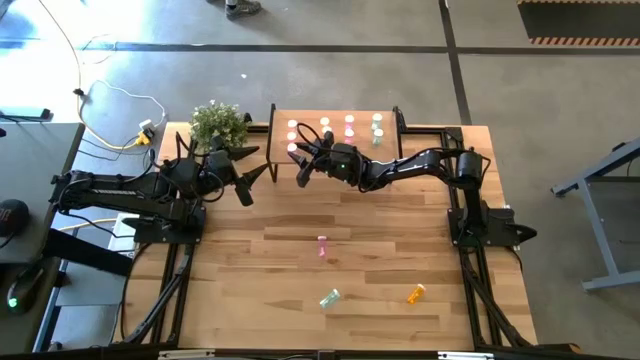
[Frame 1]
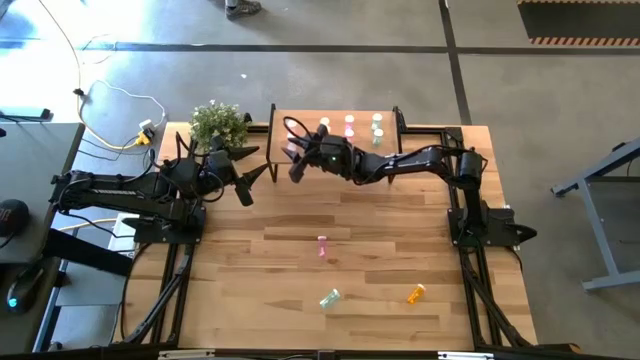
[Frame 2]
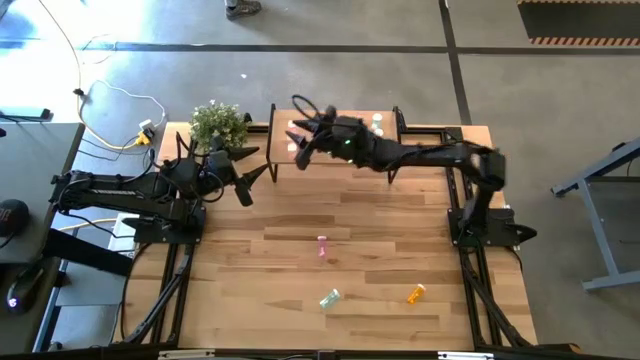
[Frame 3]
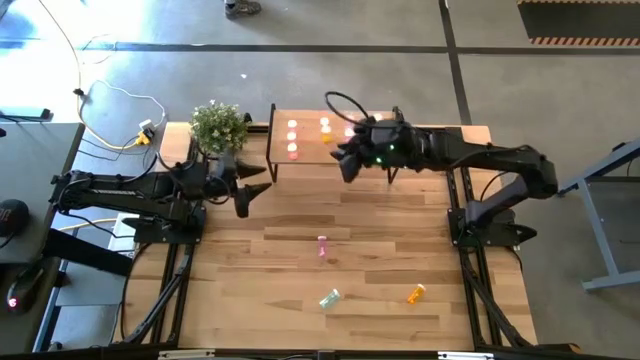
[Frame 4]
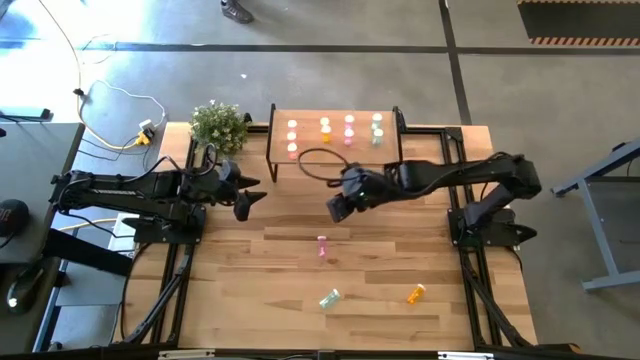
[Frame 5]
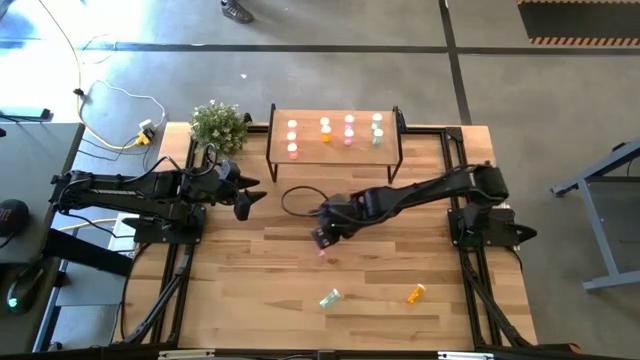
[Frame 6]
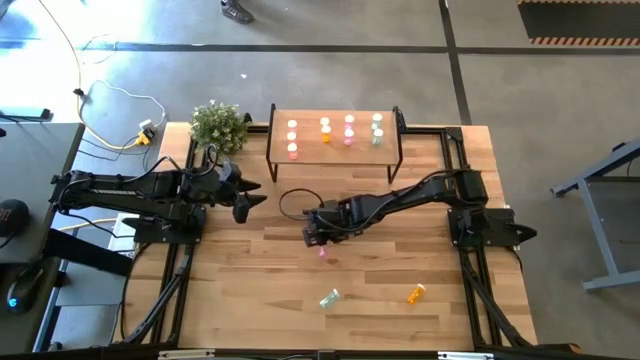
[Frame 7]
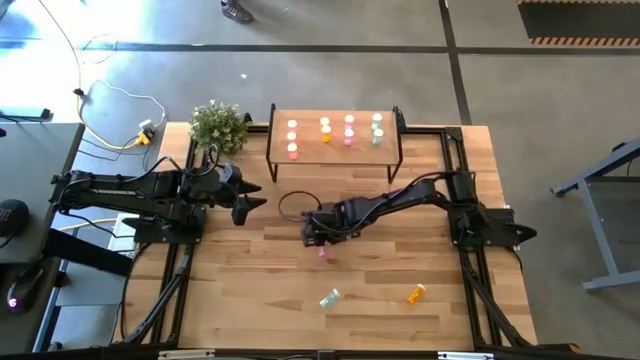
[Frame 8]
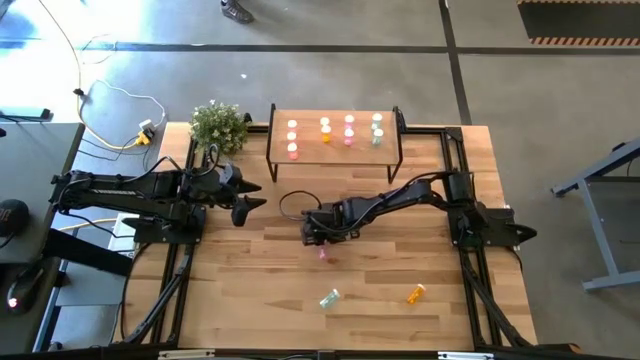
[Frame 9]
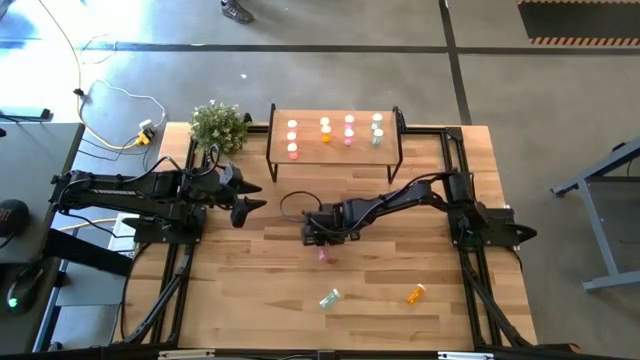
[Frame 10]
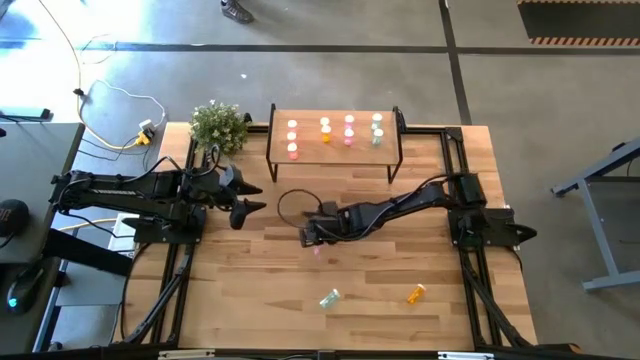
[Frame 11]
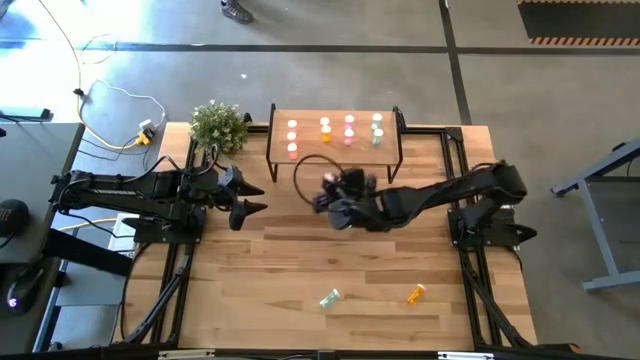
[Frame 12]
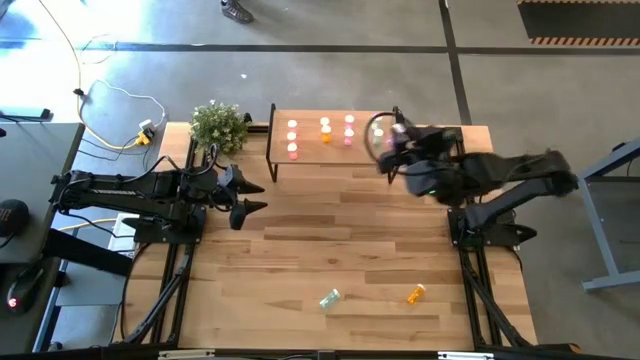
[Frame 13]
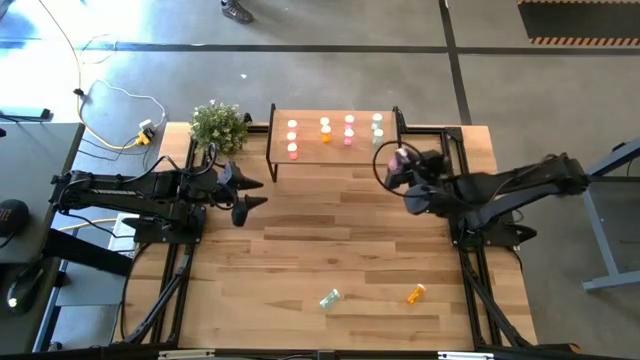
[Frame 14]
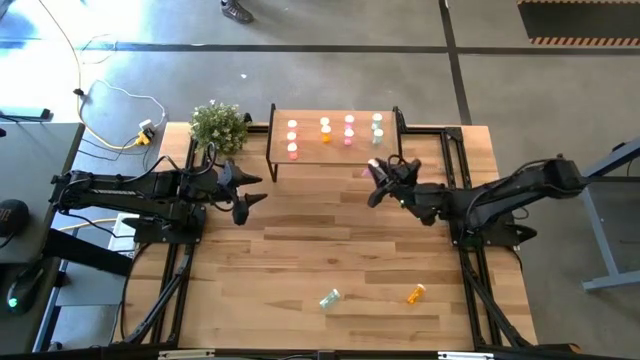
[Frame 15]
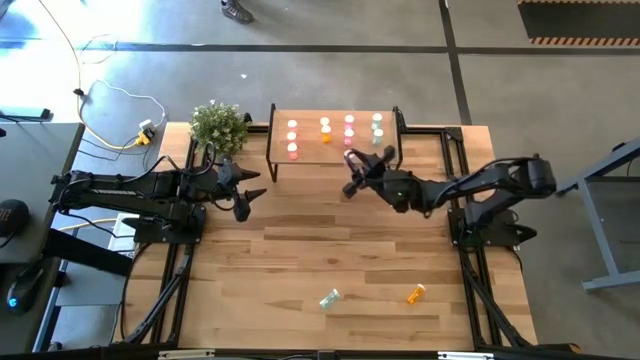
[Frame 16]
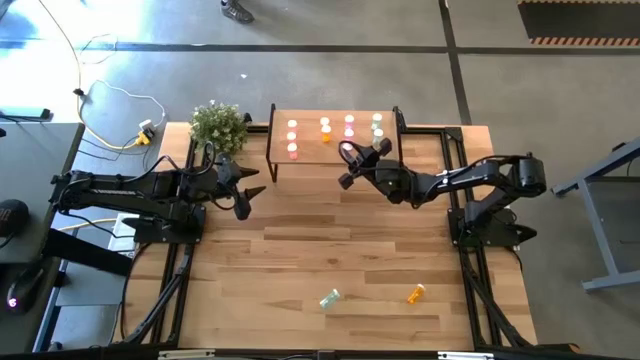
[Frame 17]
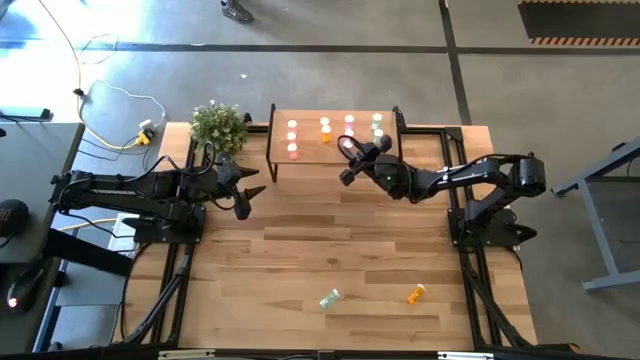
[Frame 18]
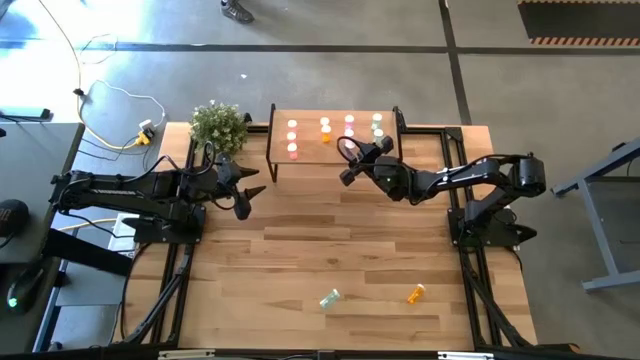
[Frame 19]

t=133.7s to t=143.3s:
Task: Pick and place medicine bottles onto shelf by color
Put the purple pill bottle on the shelf aligned with the other purple pill bottles

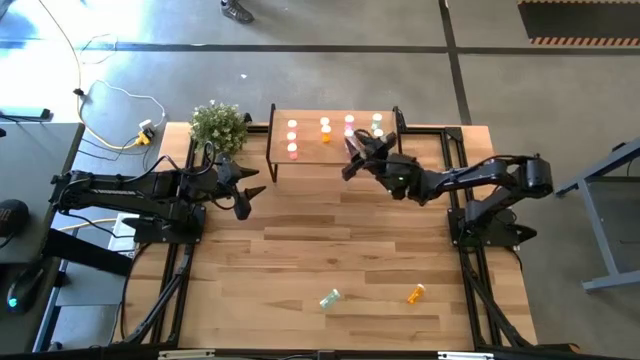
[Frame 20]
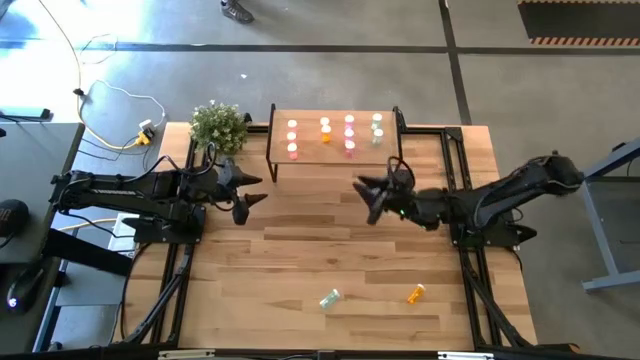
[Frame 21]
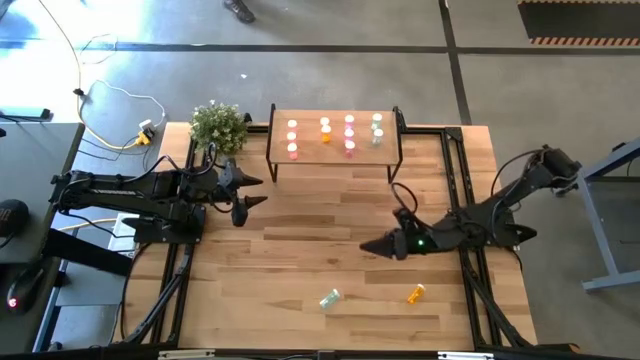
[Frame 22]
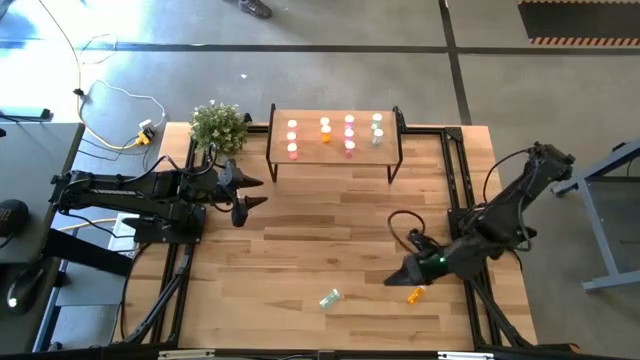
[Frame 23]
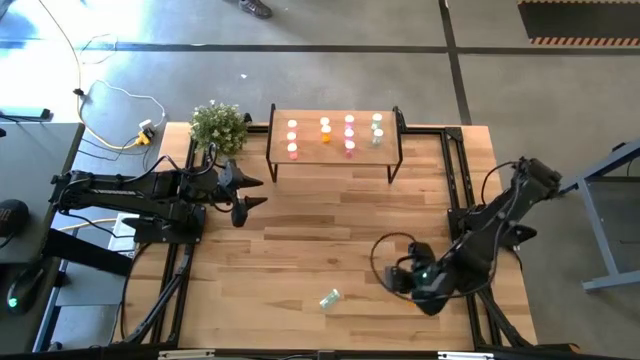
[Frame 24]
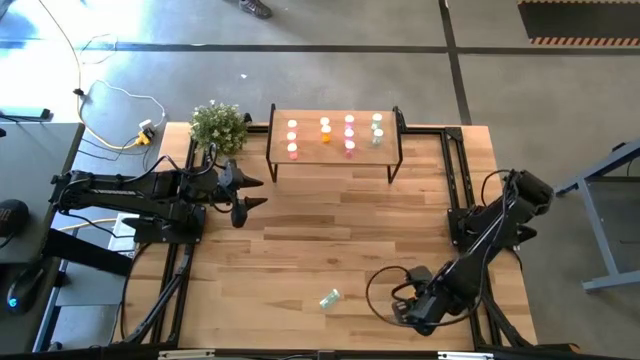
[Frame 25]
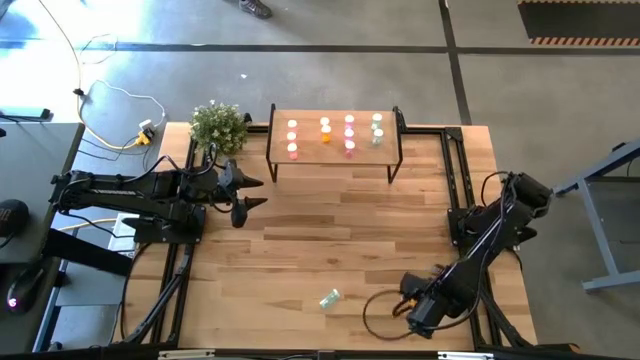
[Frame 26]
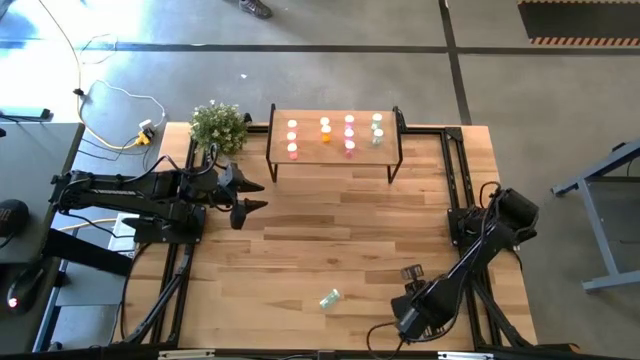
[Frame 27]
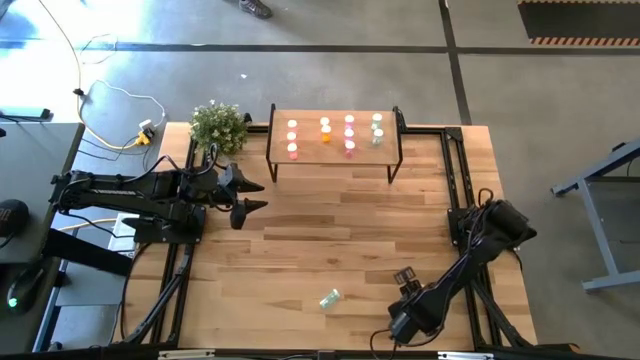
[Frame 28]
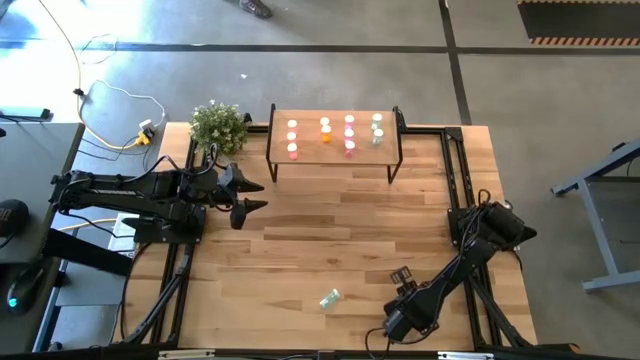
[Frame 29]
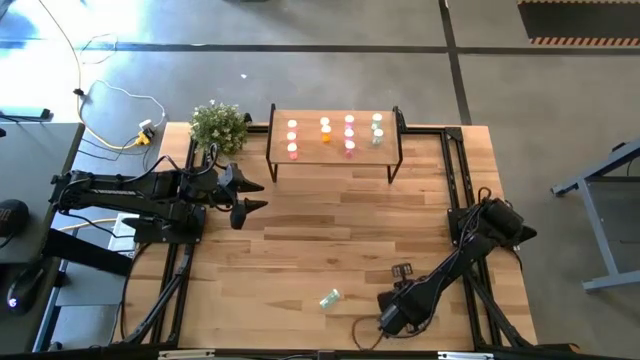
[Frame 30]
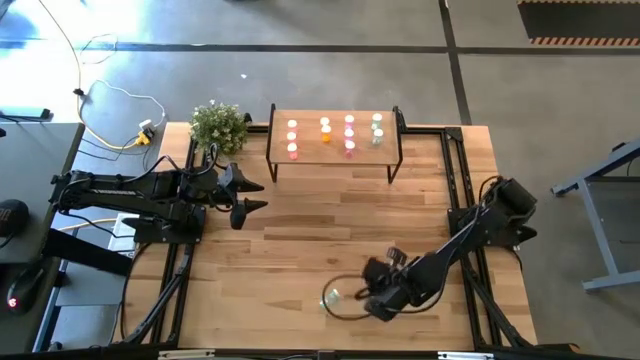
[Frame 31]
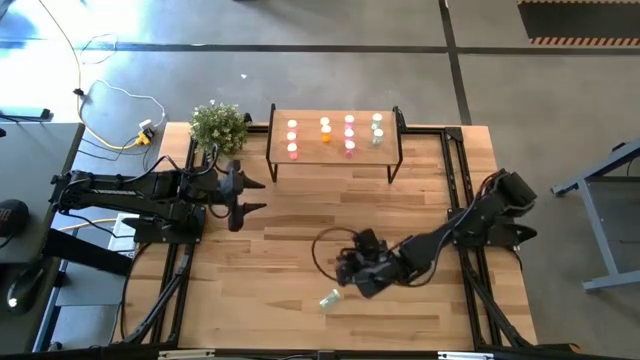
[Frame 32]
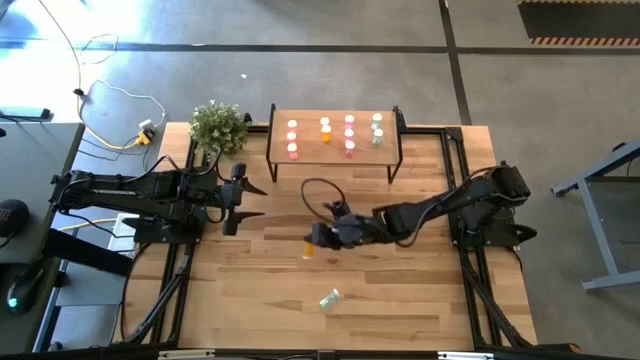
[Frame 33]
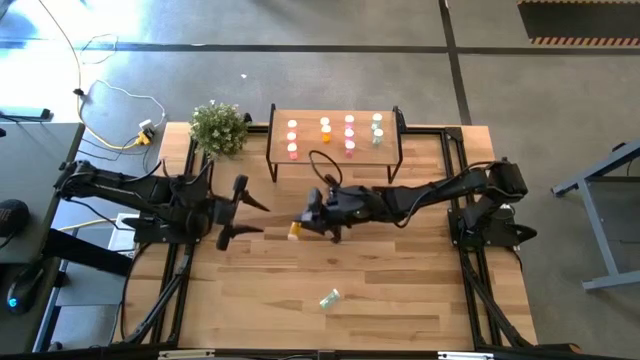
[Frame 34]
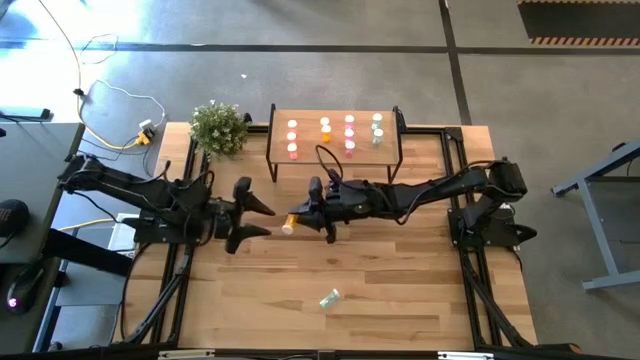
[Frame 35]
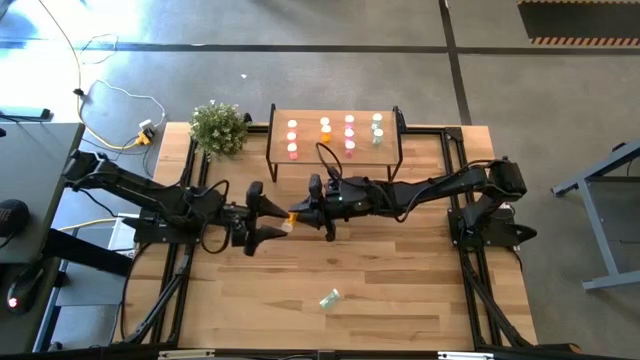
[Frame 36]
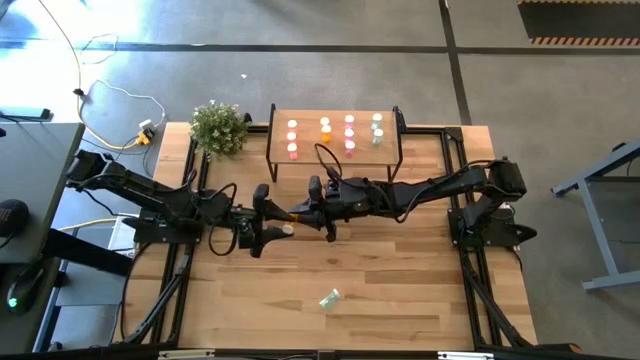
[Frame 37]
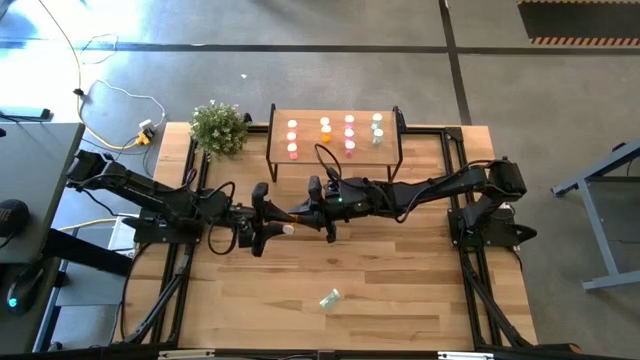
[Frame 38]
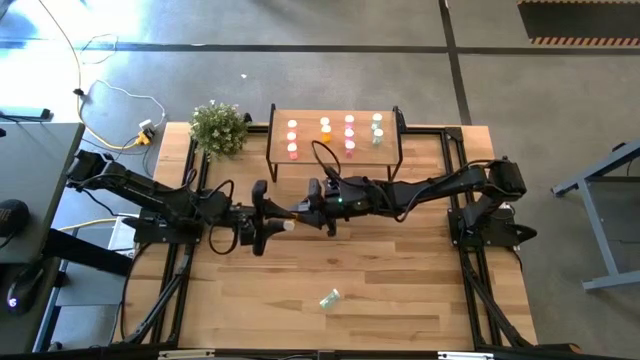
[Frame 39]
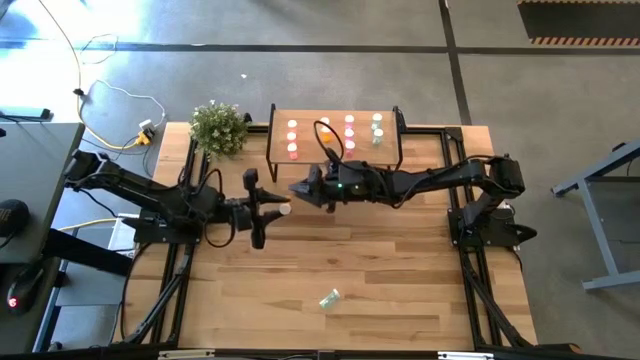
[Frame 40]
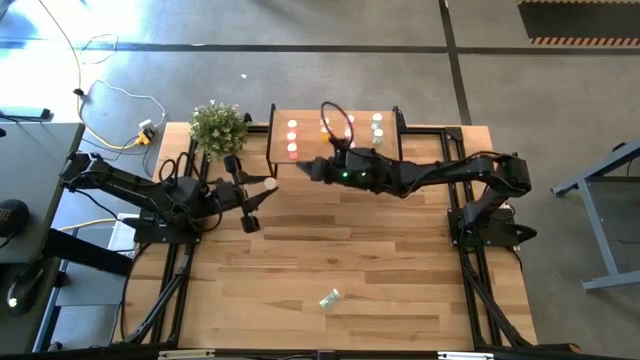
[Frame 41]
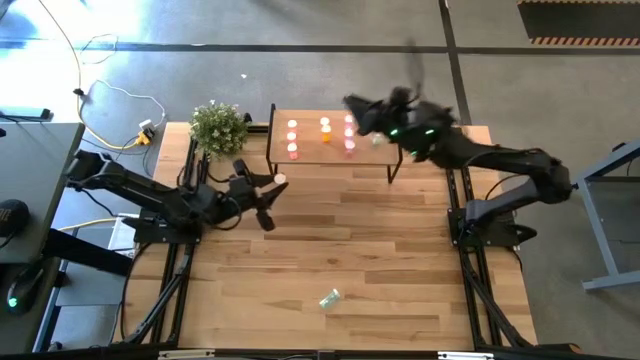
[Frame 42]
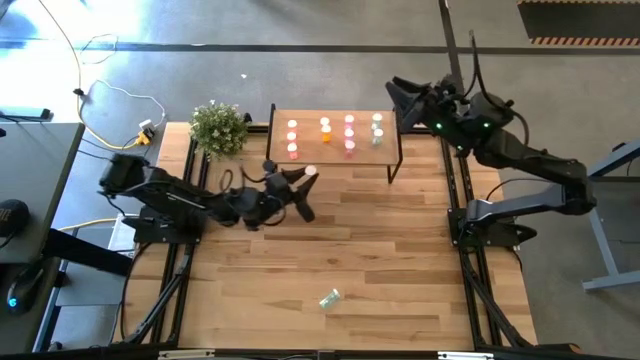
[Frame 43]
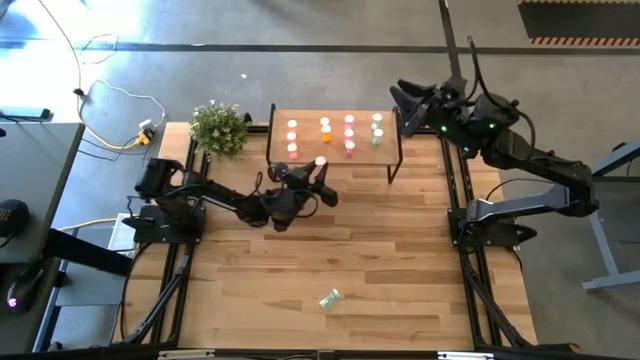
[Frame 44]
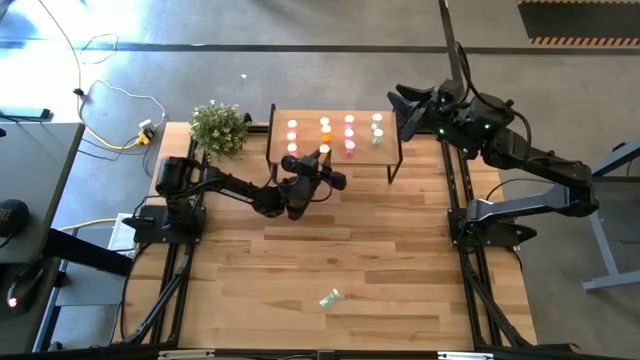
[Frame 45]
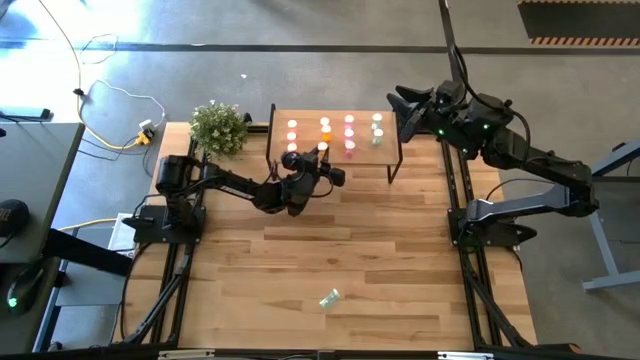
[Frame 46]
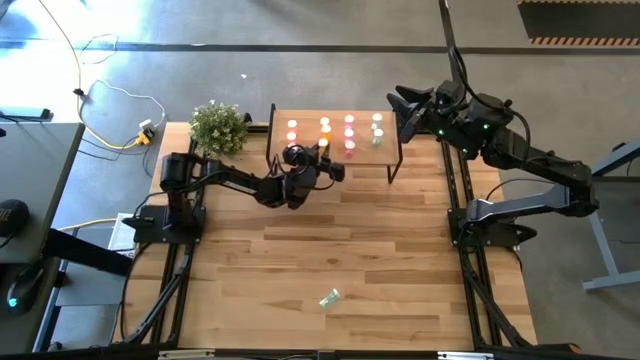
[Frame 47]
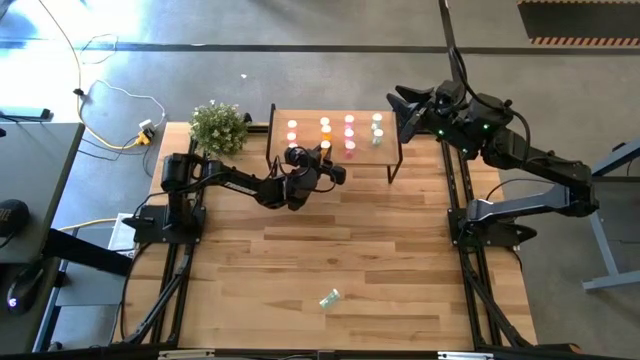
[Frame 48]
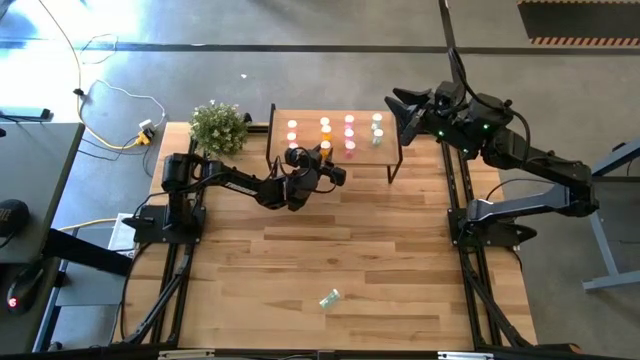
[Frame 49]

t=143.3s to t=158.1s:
Put the orange pill bottle on the shelf aligned with the other orange pill bottles
